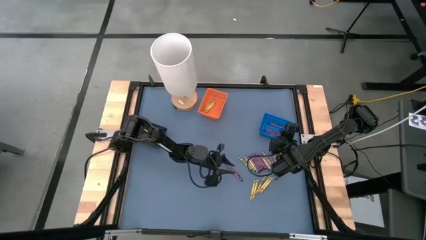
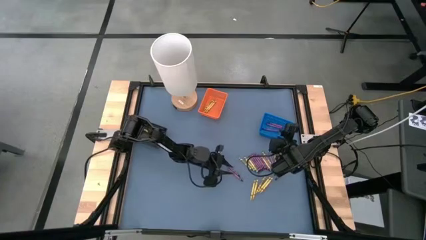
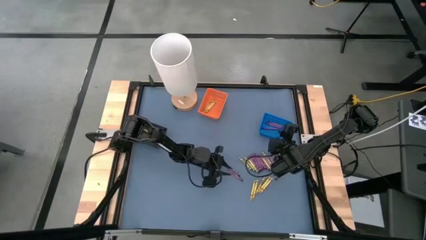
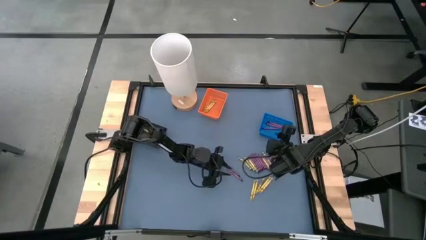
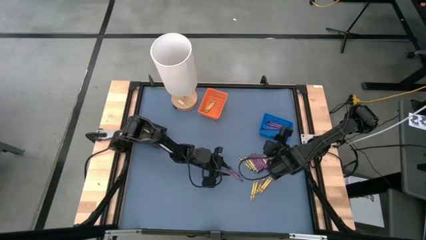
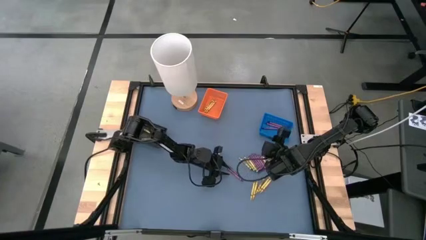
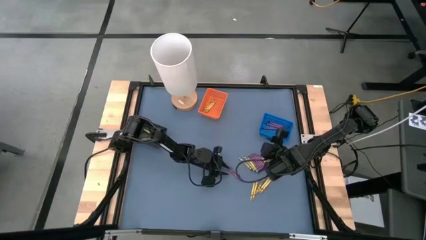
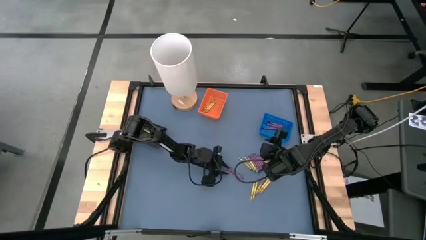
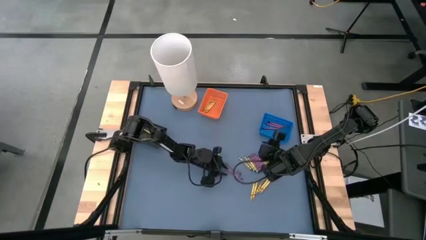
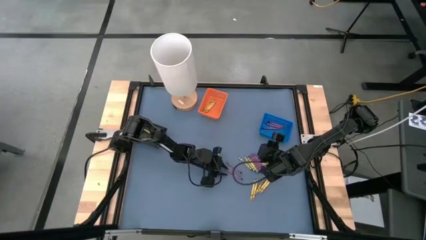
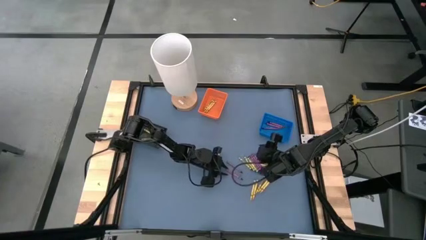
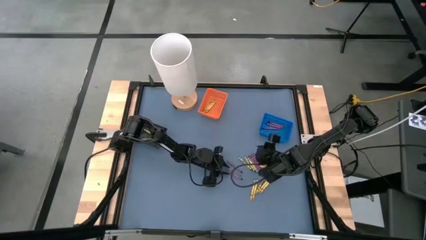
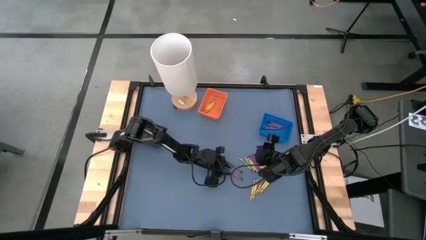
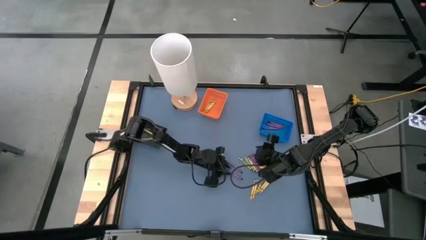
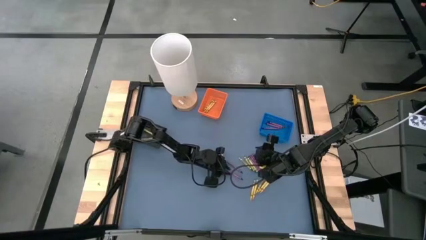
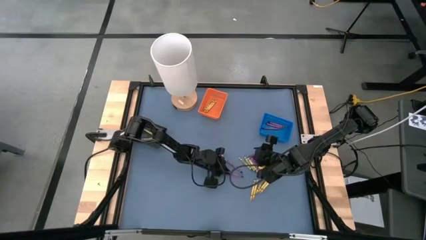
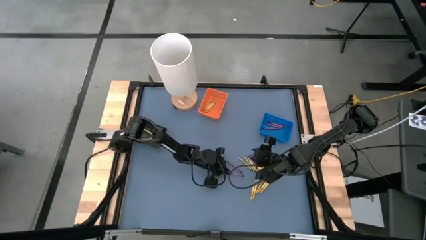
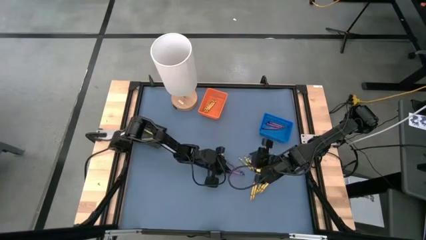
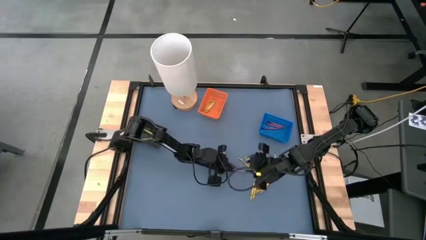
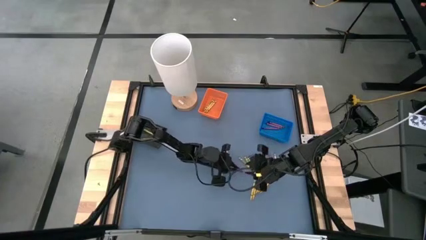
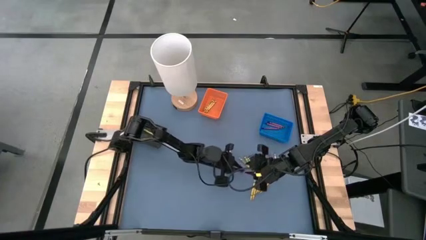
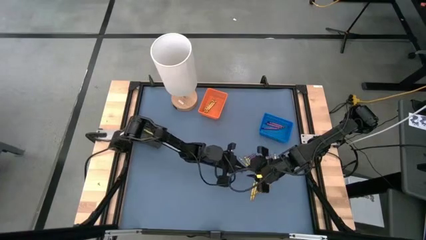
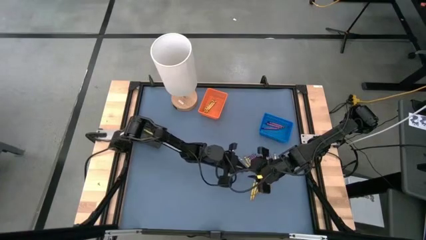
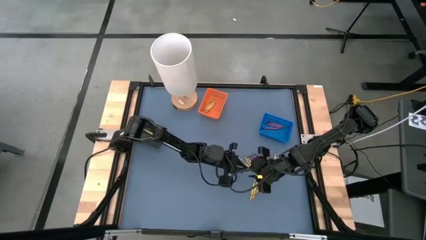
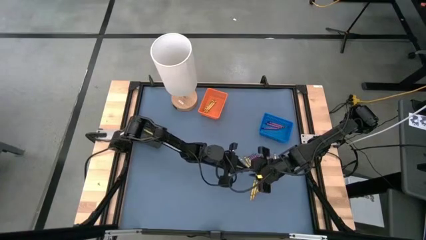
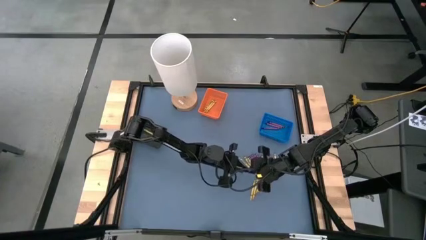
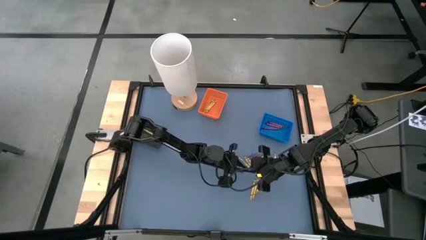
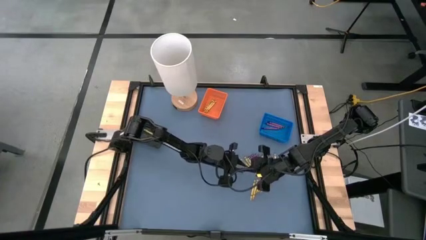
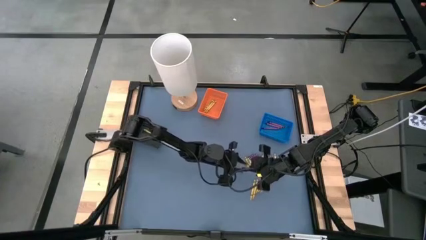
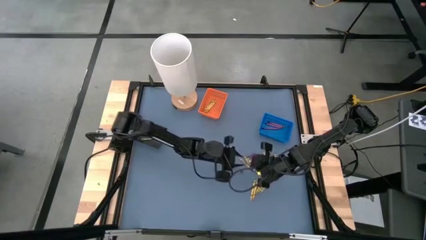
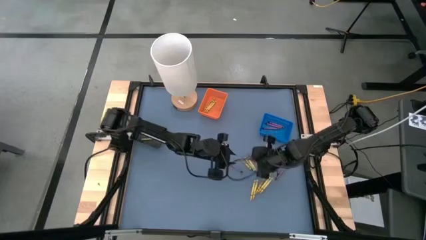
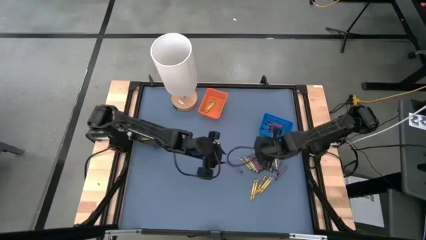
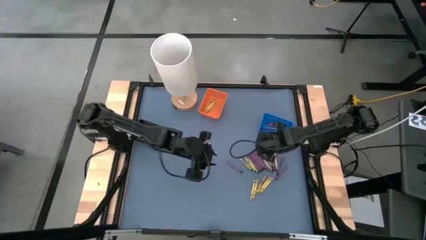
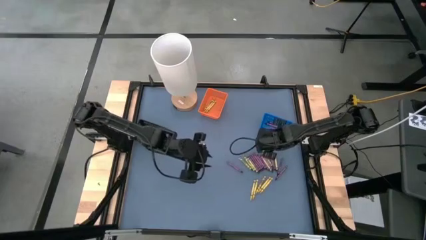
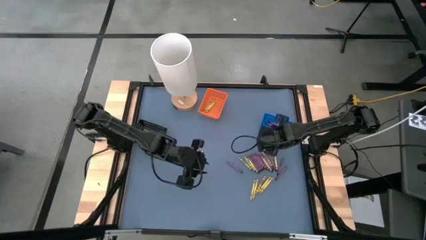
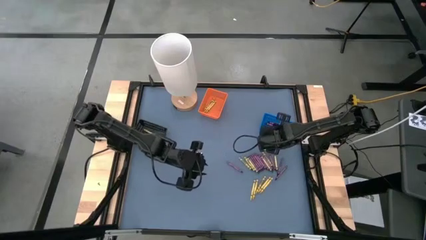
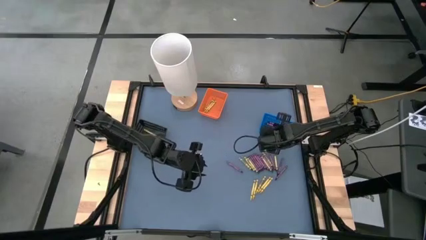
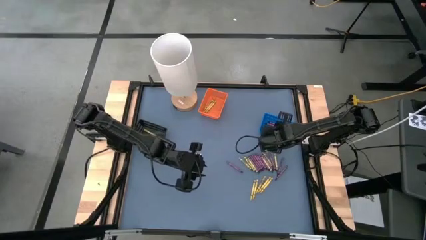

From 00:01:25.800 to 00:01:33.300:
Task: Sort crayons
Put the violet crayon into the blue basket

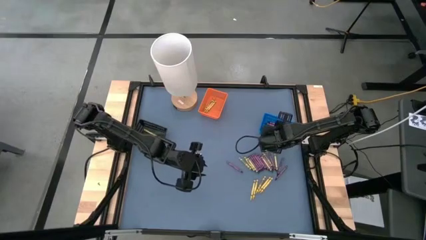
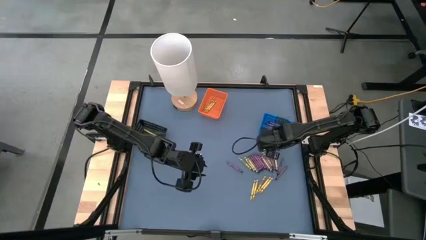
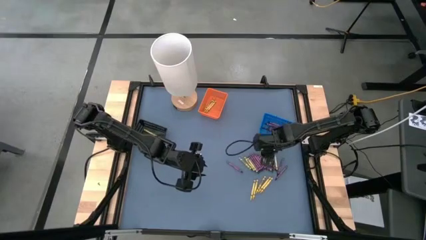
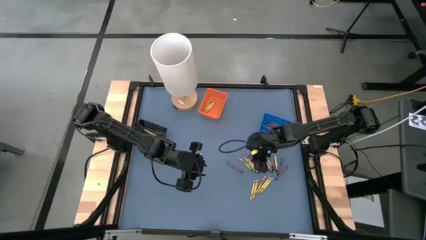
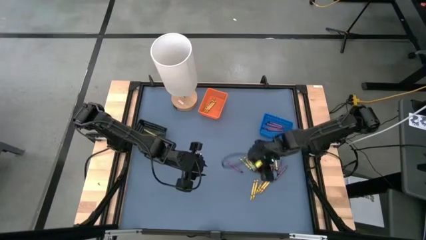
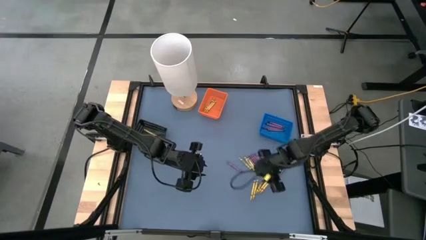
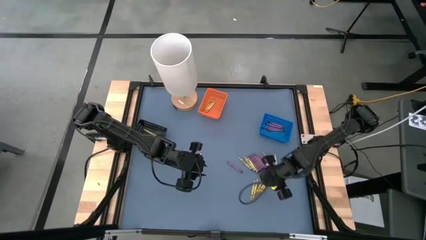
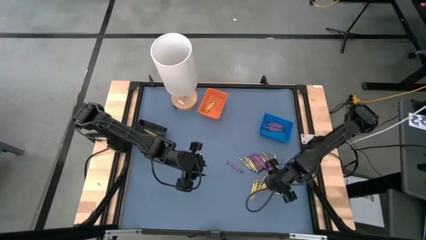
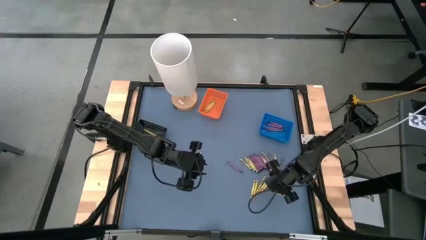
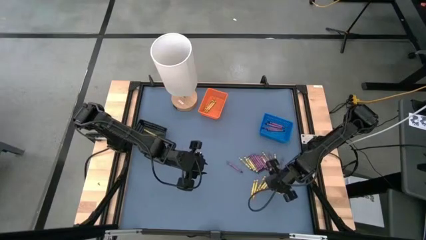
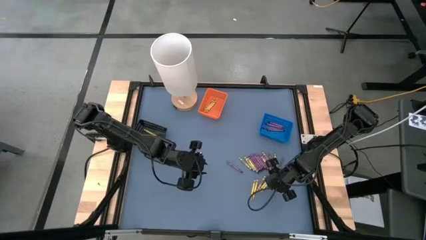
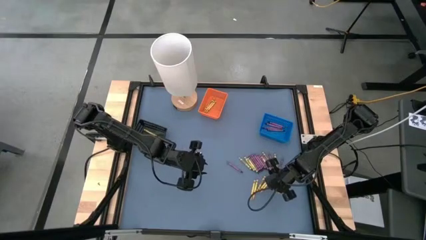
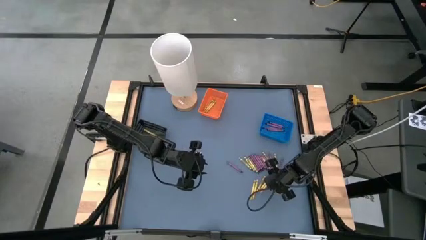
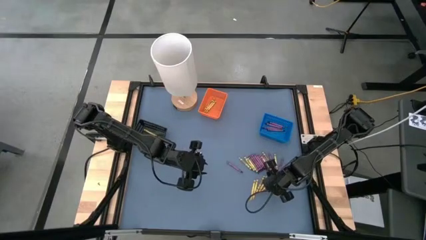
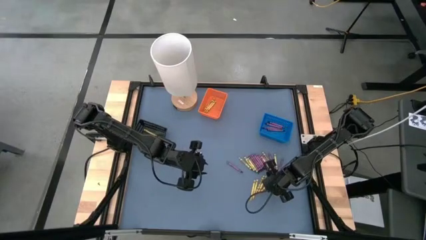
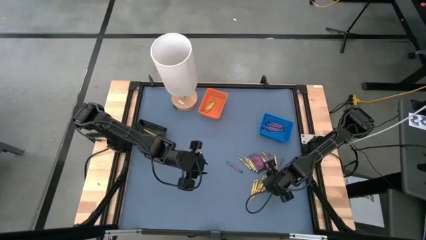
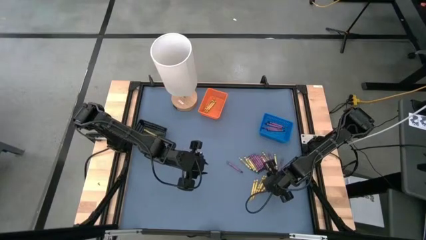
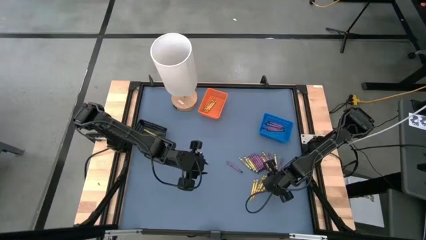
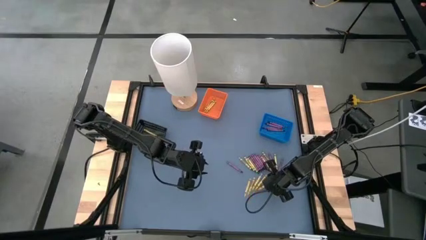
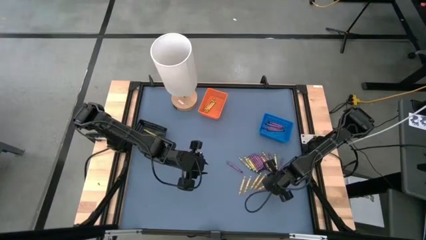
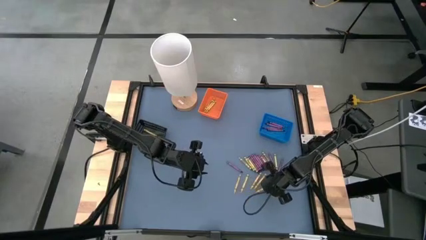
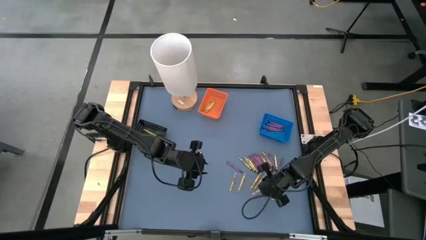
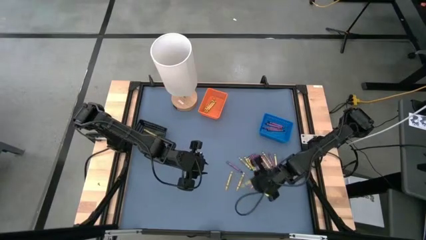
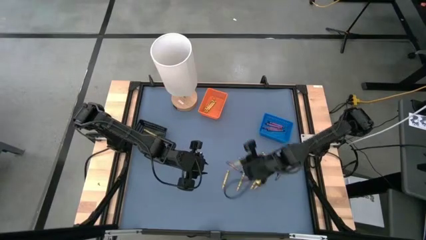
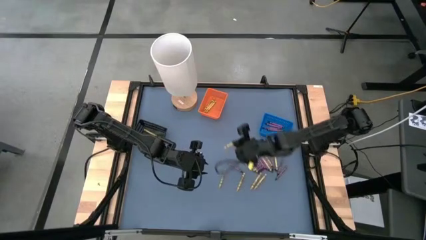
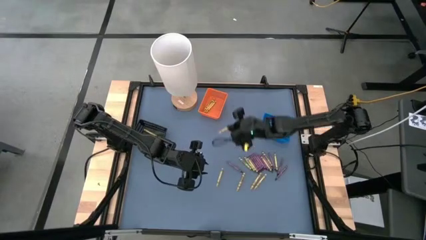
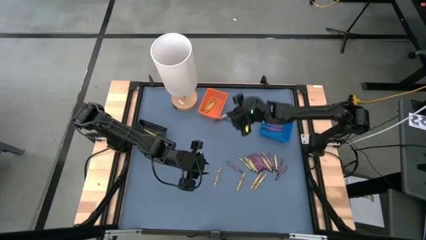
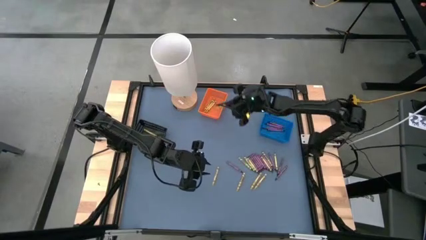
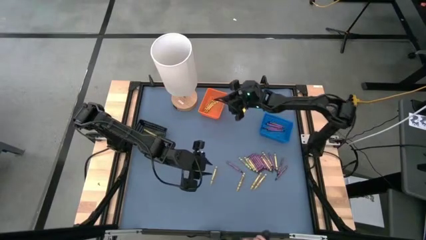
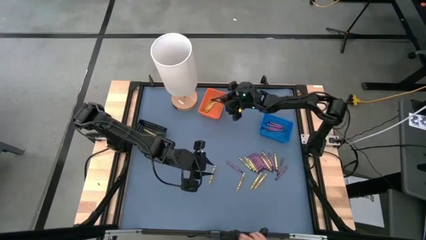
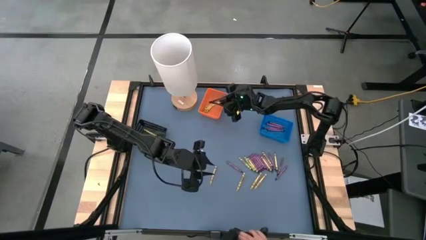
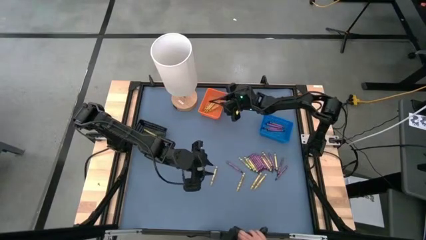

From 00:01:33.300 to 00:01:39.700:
Put the yellow crayon into the orange basket

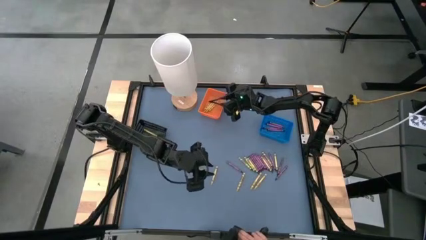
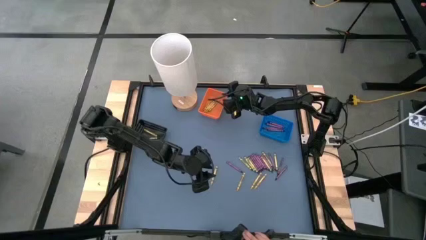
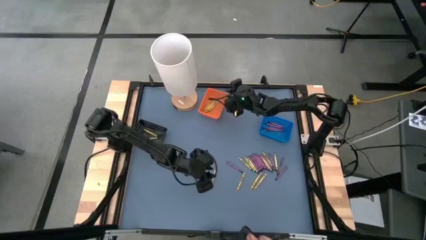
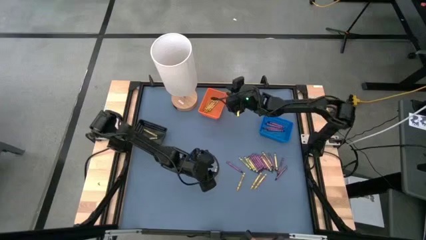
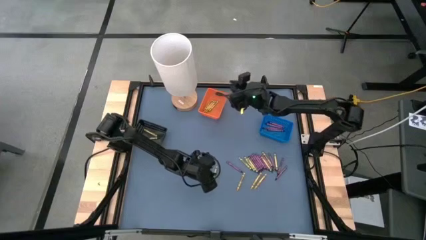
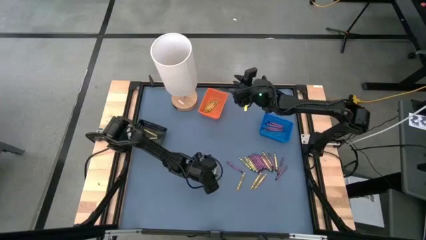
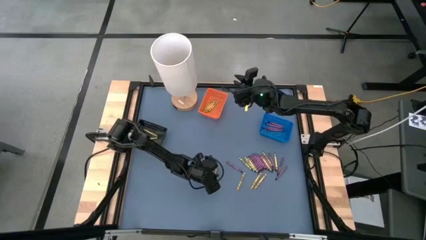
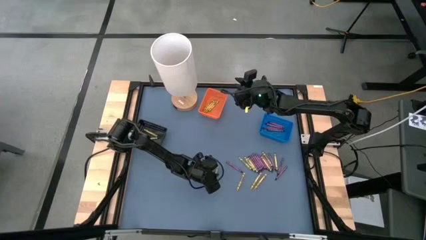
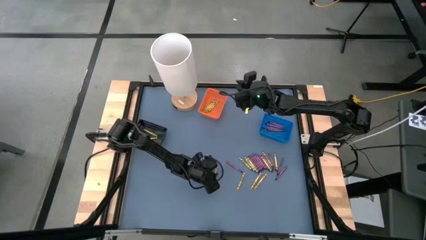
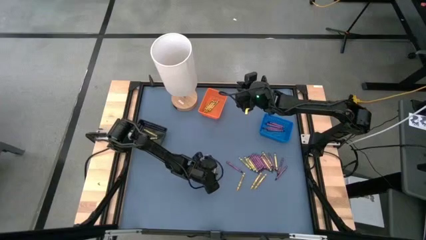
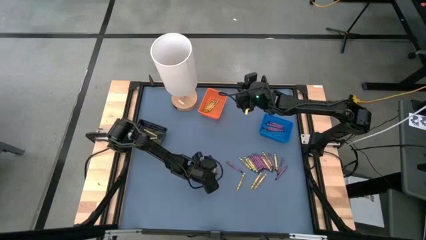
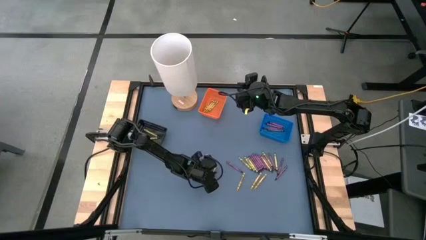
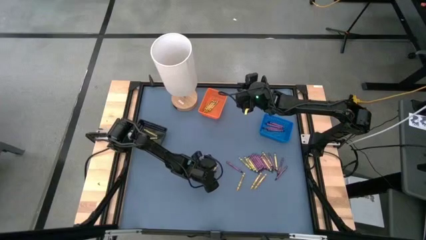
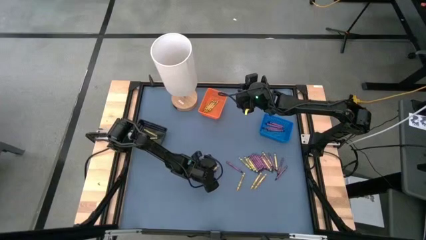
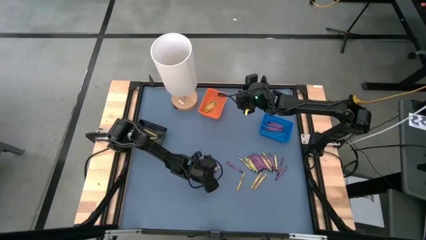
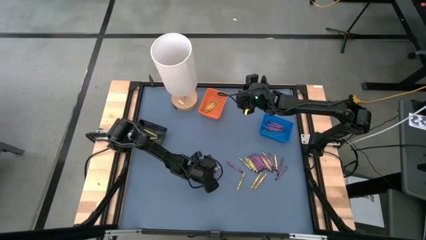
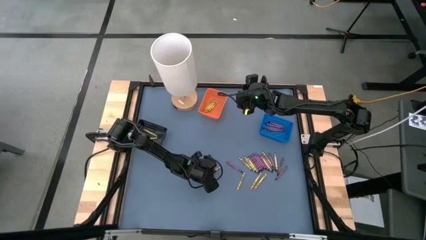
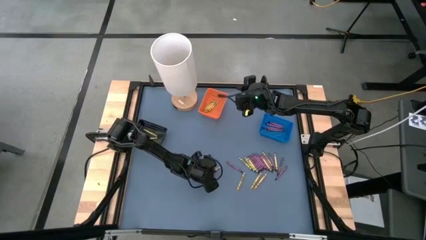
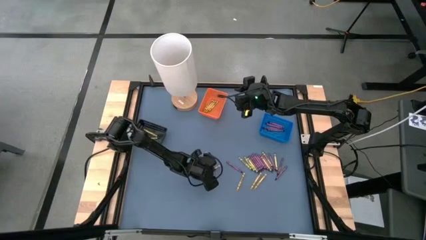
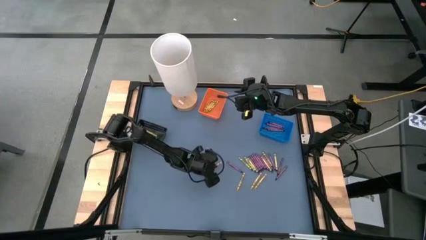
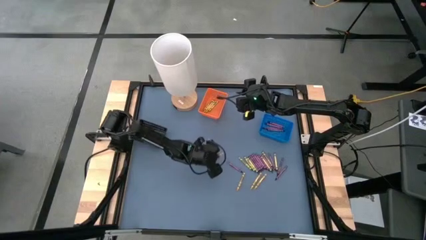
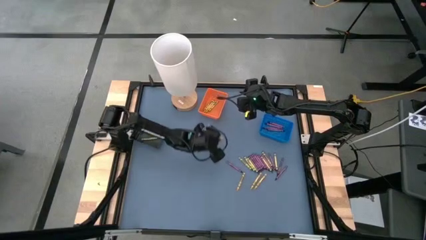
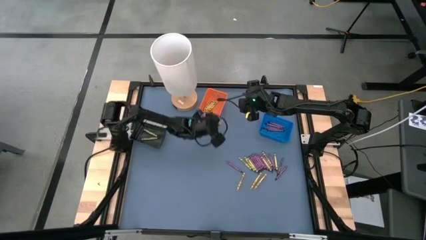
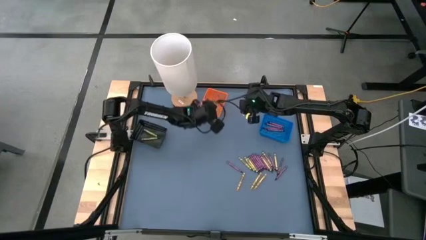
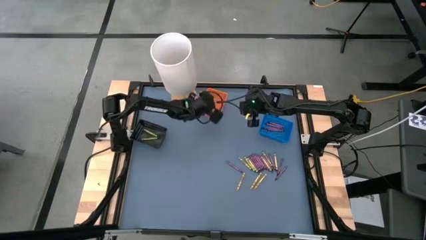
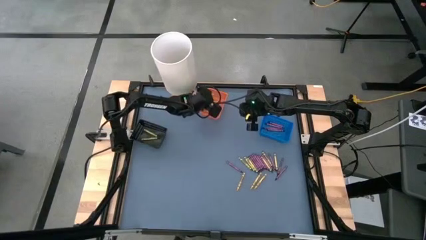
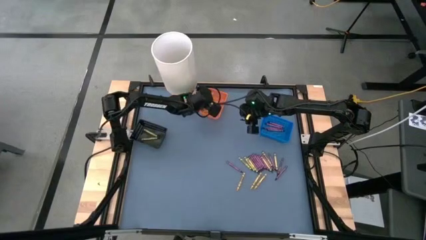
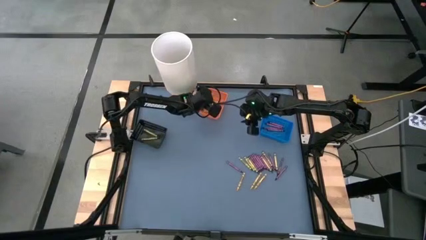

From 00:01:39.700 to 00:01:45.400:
Put the yellow crayon into the orange basket
